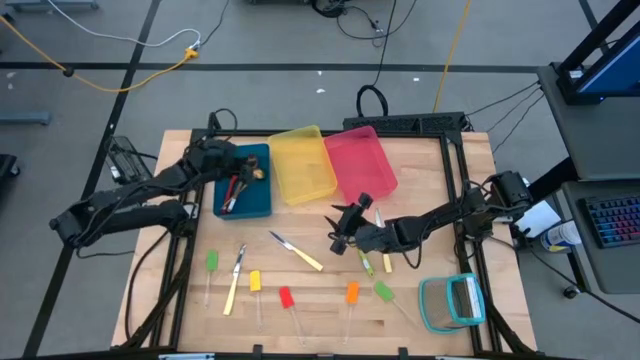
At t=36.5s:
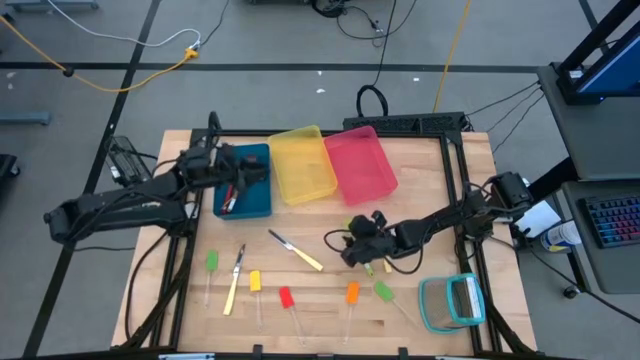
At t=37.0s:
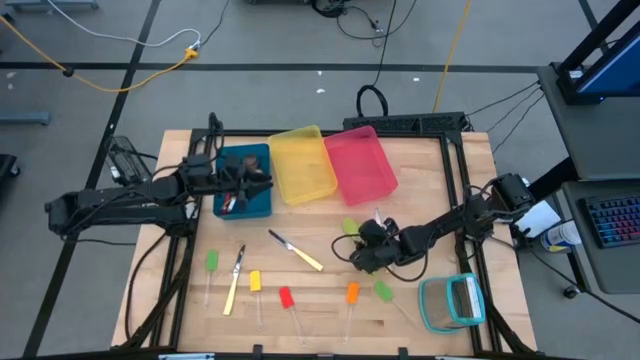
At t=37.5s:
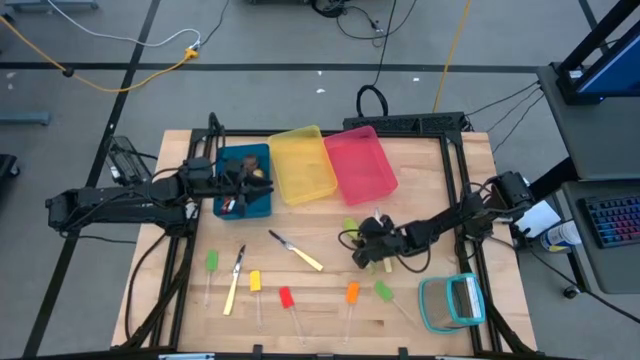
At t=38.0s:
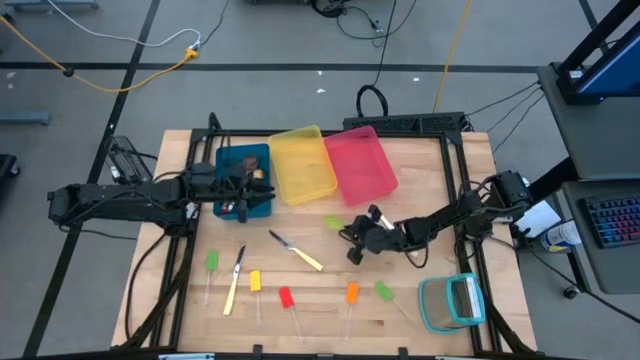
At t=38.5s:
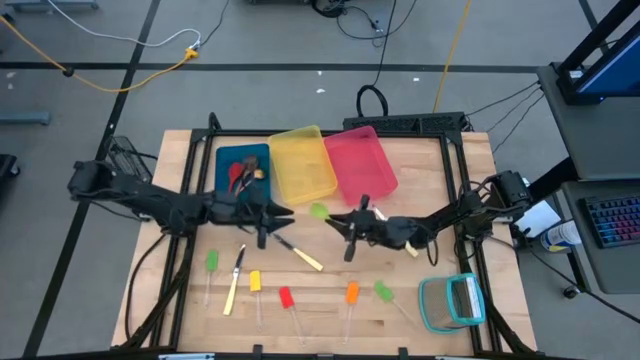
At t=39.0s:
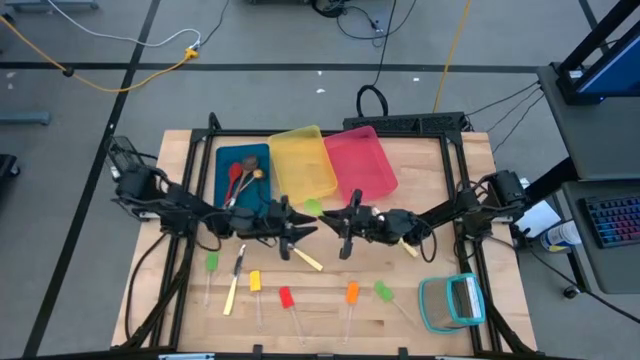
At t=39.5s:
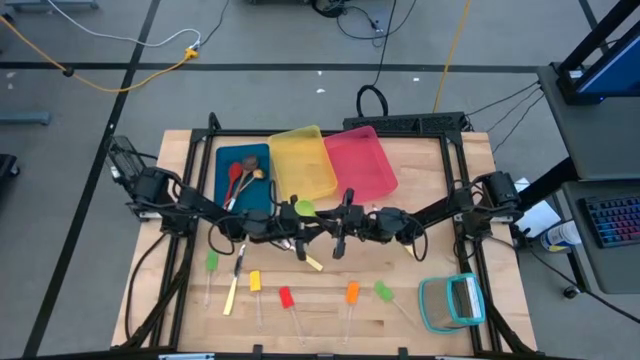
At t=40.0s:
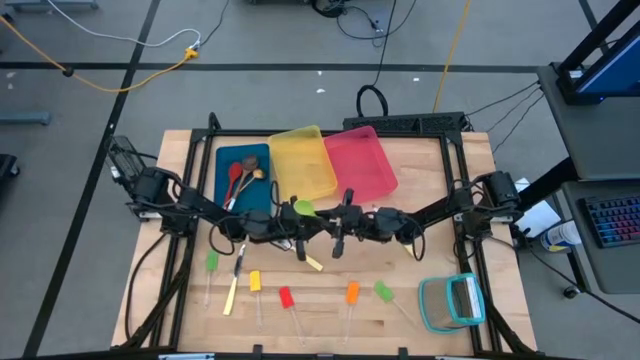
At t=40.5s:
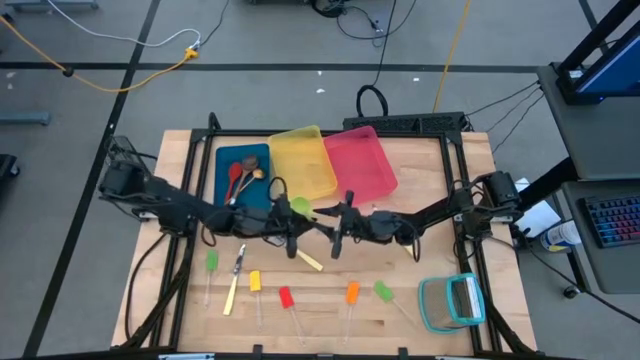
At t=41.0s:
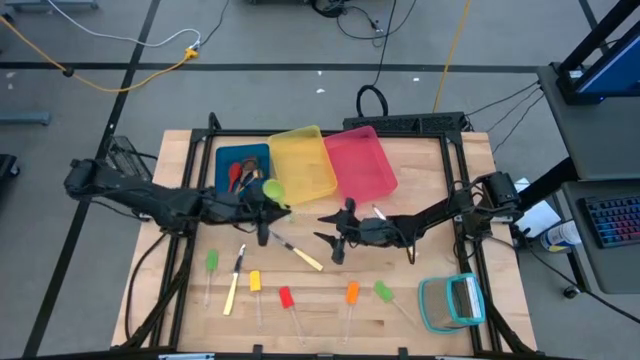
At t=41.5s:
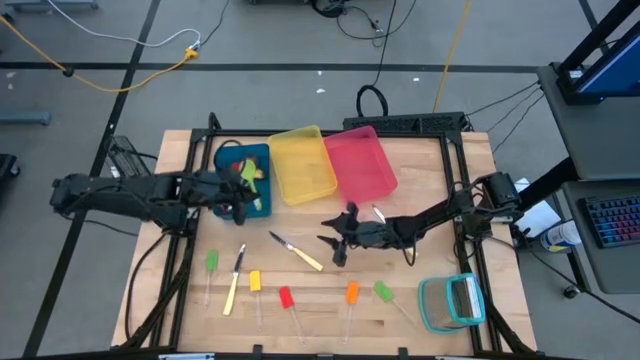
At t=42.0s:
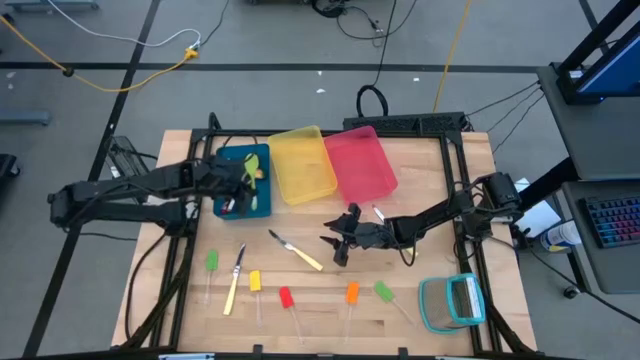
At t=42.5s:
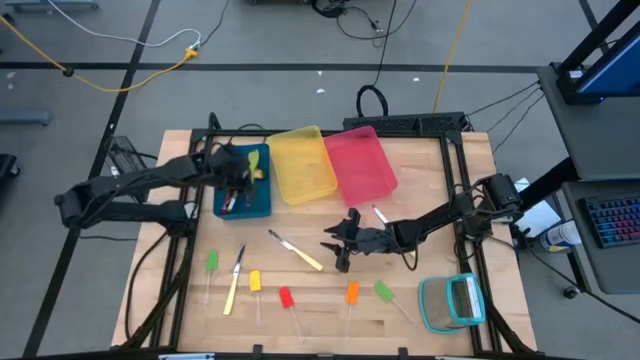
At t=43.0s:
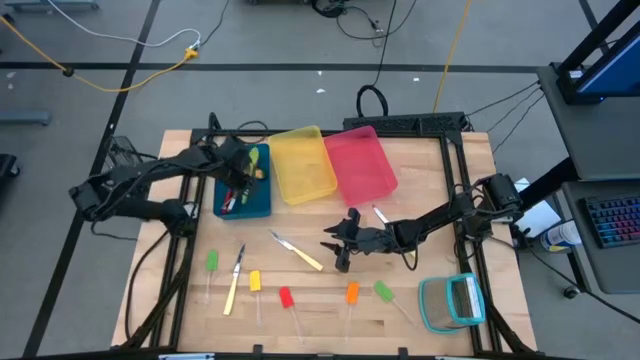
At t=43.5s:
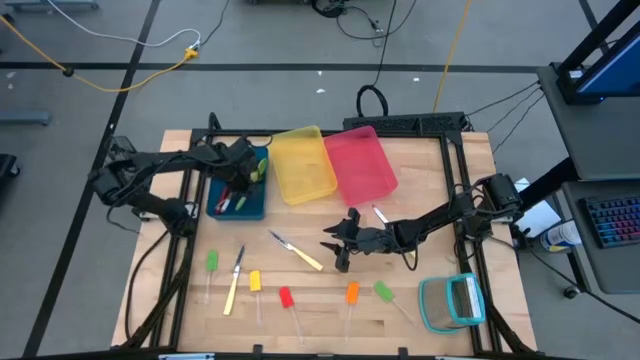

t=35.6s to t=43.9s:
Task: Pick & Place Kitchen Items
Put the green serving spoon into the blue bin

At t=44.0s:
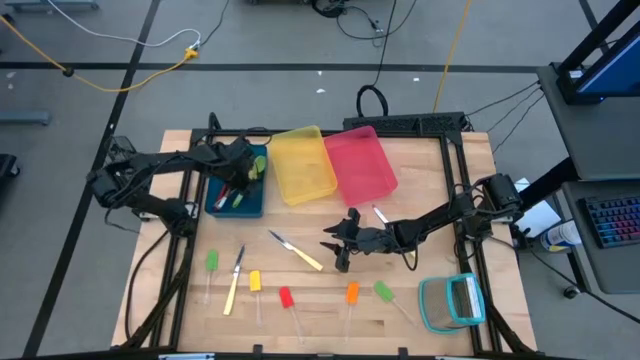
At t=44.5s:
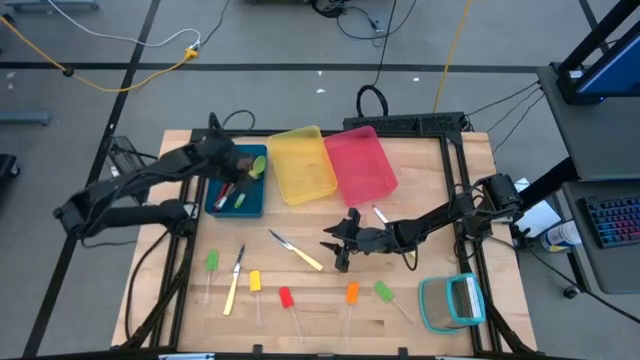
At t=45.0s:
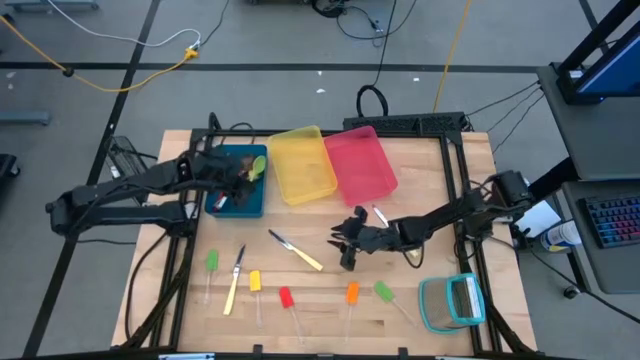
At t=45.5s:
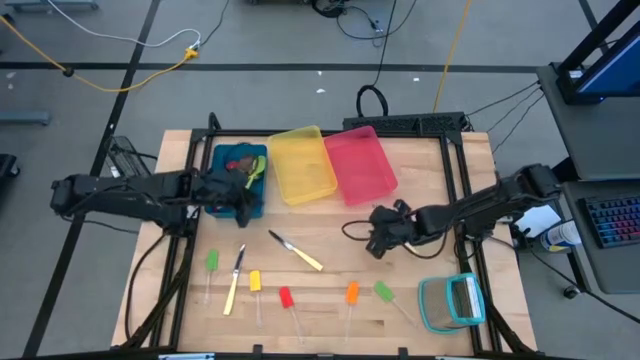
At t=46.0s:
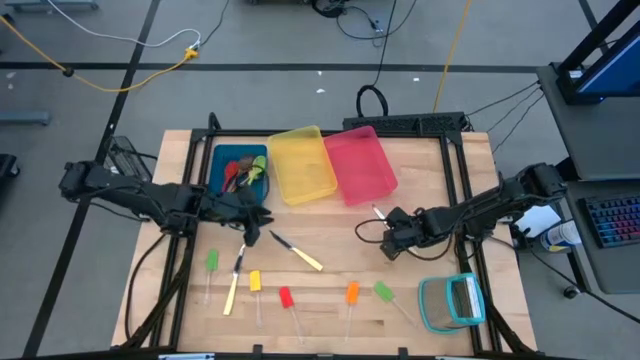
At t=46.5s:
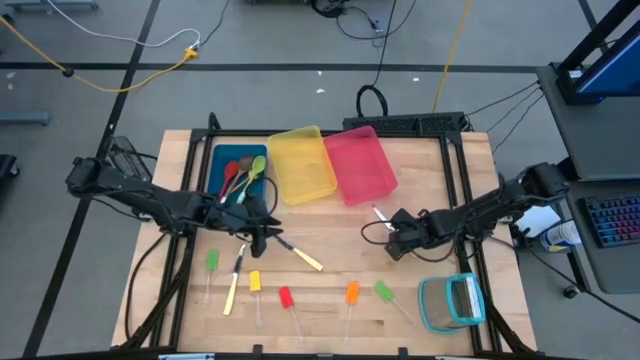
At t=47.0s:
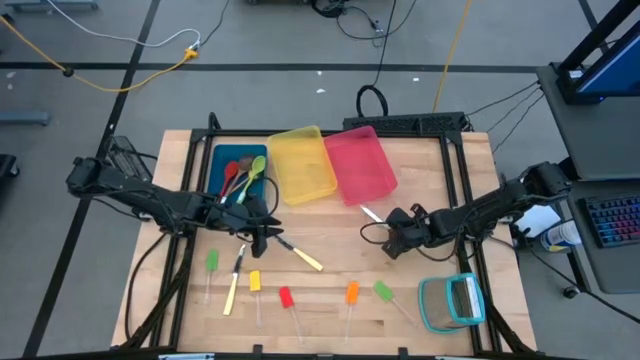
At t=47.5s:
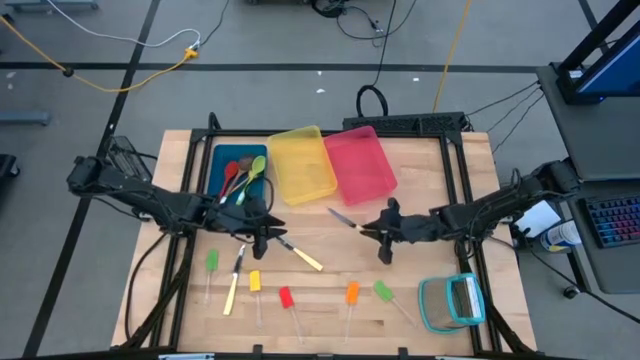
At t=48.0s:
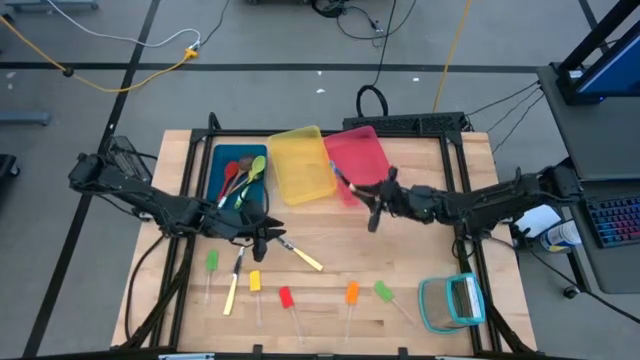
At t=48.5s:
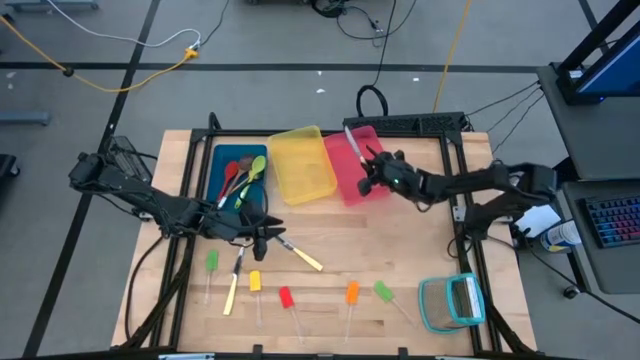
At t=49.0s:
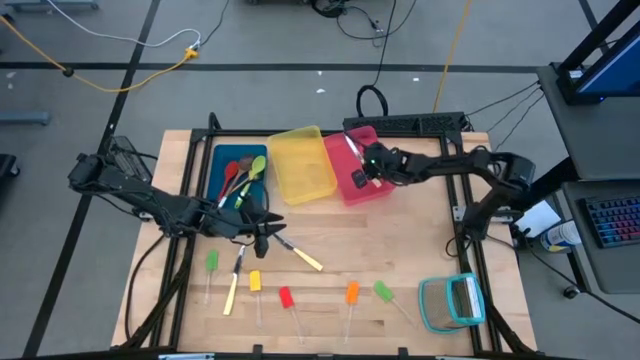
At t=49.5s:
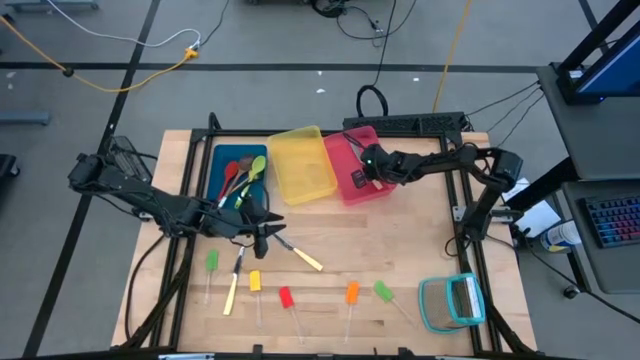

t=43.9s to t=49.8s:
Put the right yellow knife into the red bin

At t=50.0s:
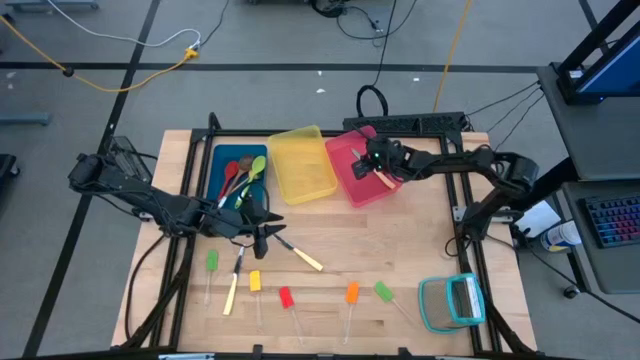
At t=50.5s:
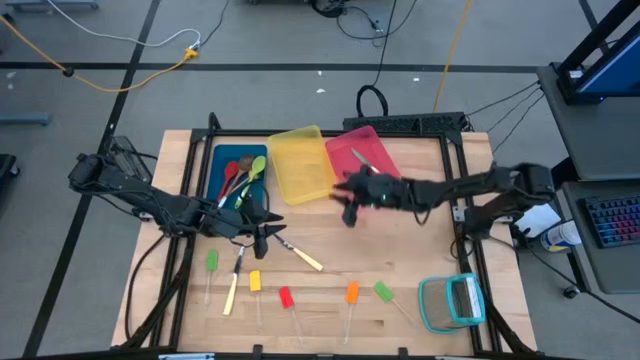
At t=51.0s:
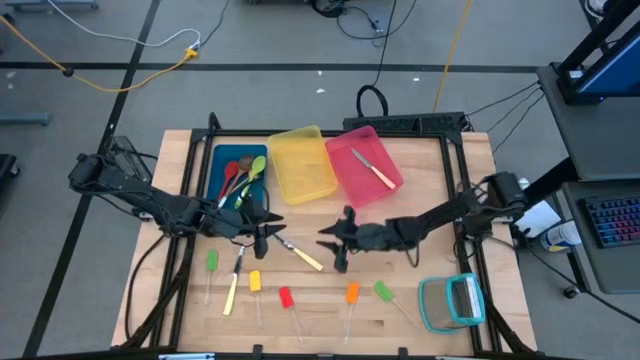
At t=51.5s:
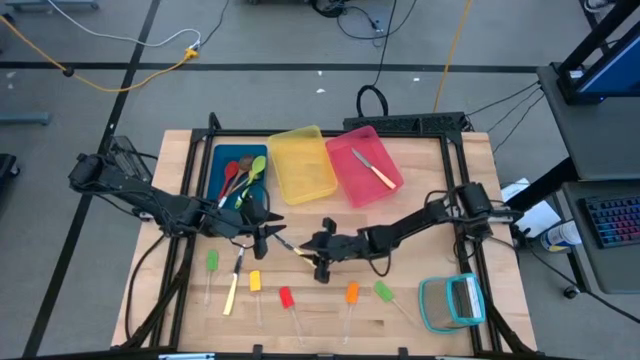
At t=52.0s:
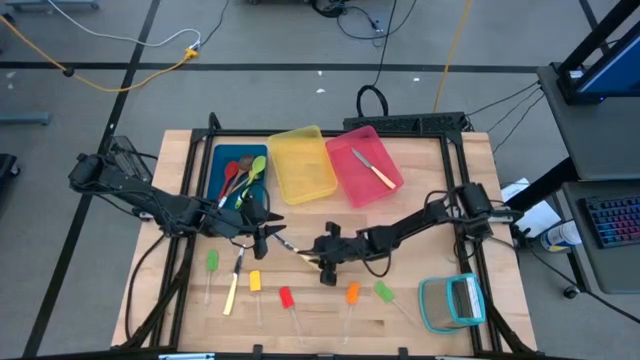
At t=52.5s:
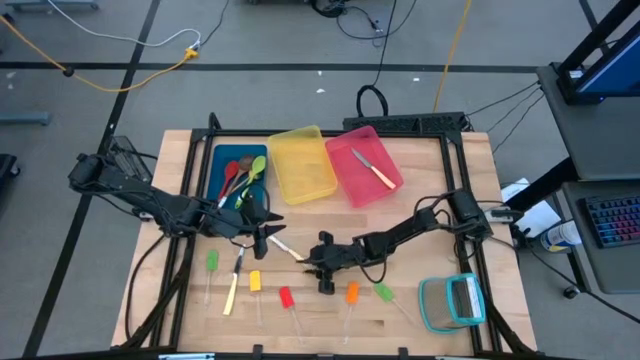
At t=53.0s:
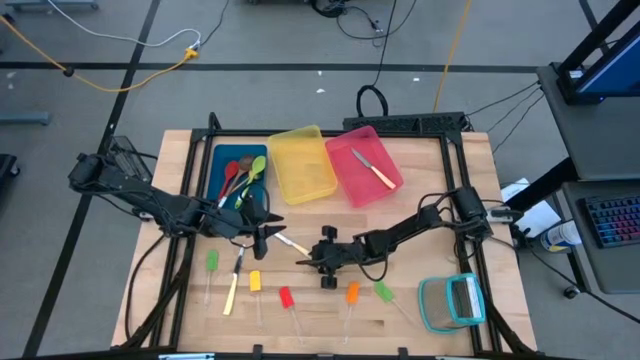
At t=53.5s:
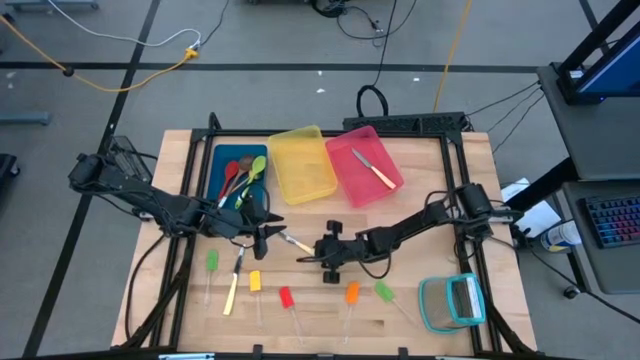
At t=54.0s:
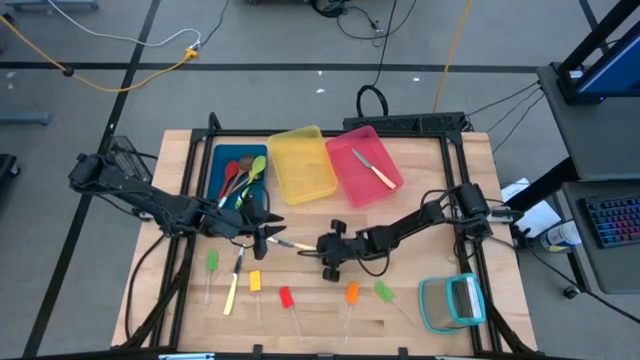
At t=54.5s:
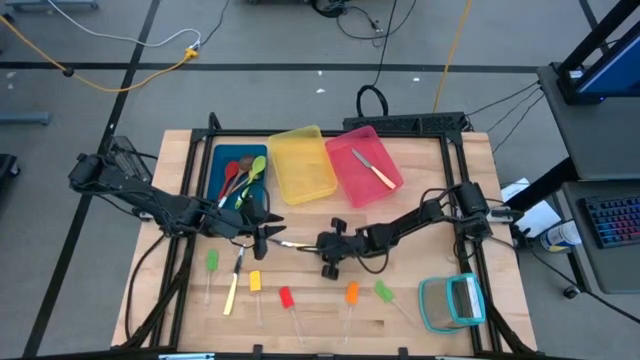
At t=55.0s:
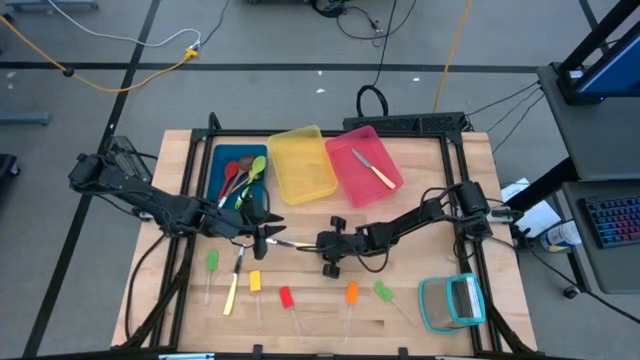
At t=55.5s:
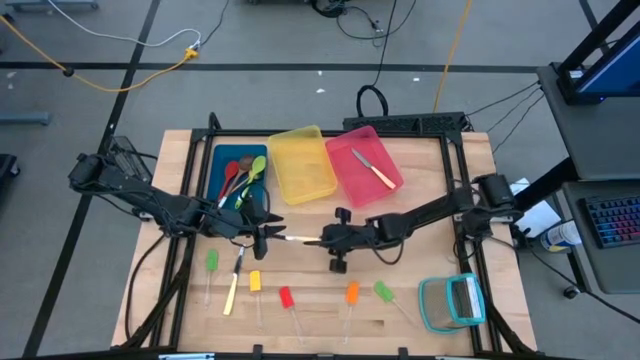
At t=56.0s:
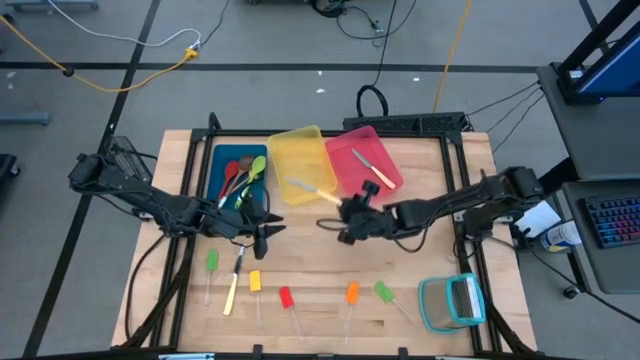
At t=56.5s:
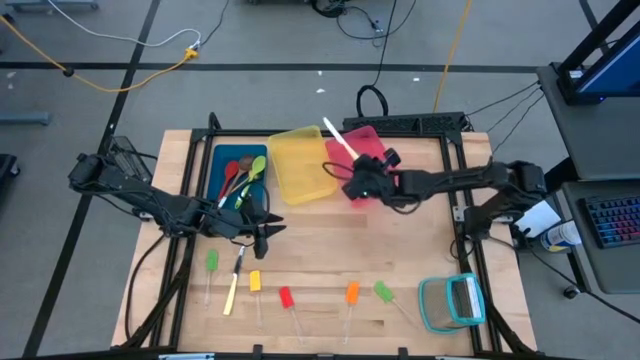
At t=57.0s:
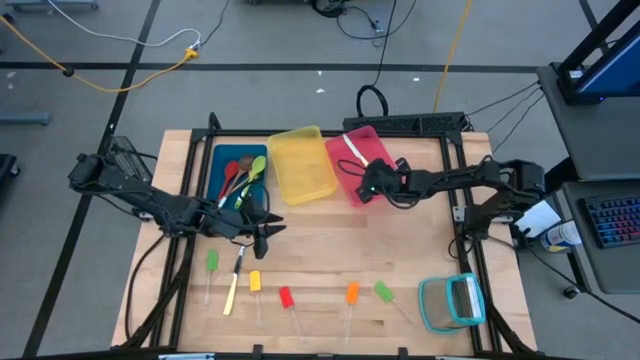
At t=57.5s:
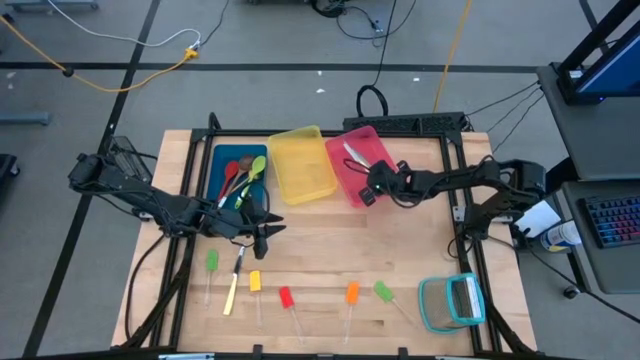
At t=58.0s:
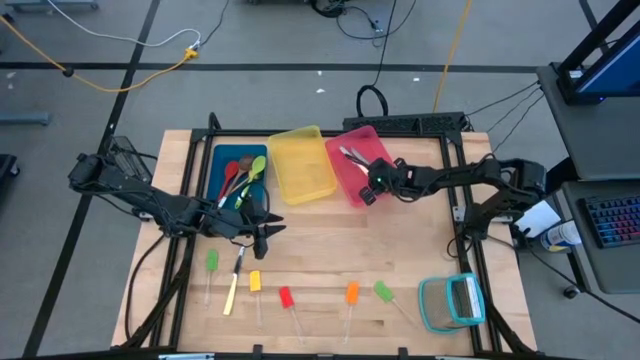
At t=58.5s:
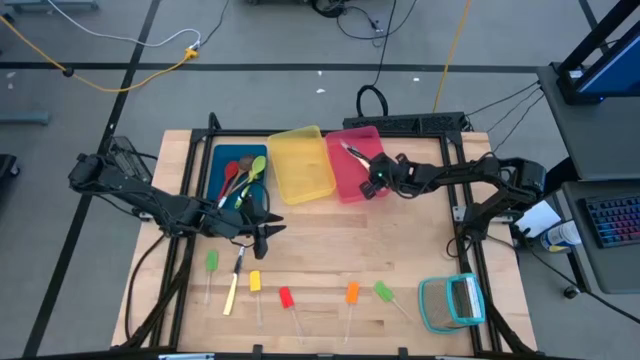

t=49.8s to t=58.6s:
Put the right yellow knife into the red bin
